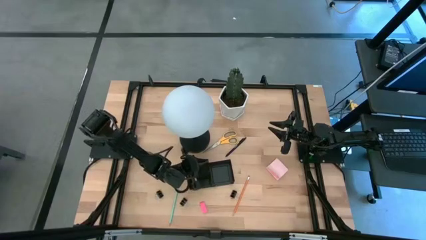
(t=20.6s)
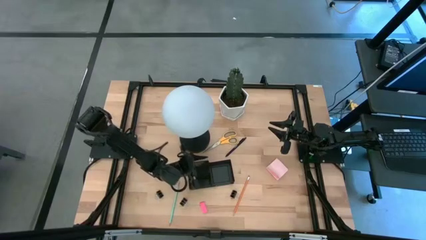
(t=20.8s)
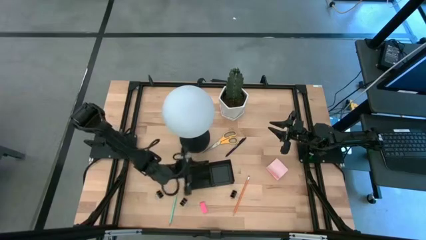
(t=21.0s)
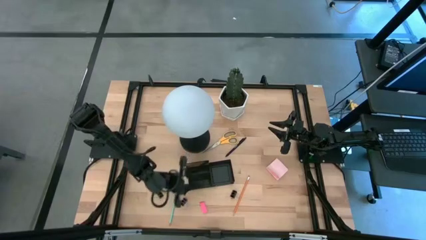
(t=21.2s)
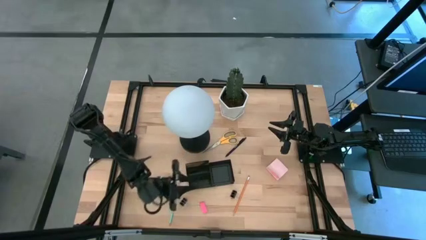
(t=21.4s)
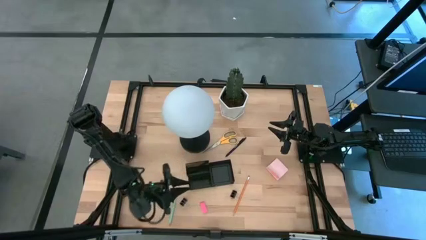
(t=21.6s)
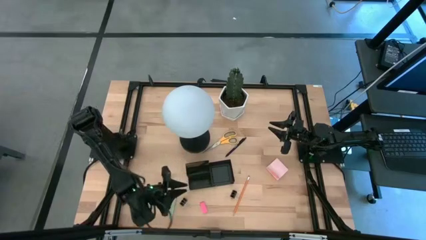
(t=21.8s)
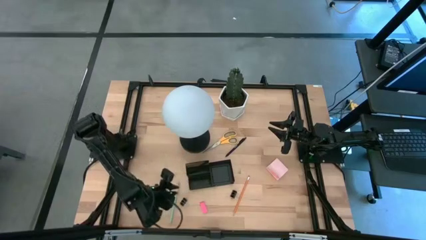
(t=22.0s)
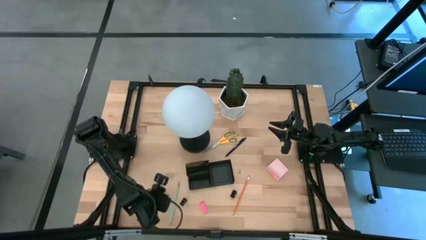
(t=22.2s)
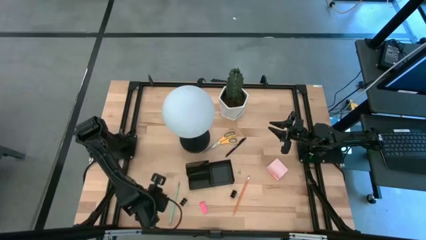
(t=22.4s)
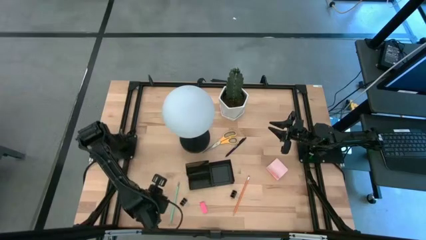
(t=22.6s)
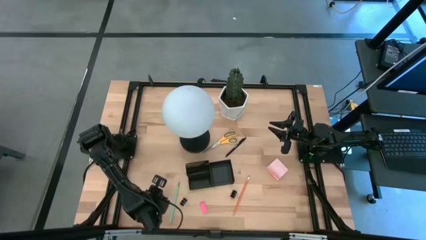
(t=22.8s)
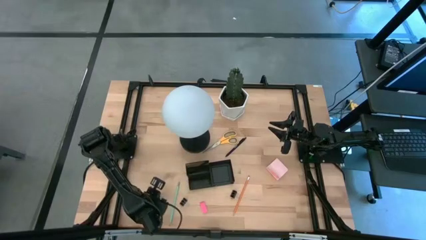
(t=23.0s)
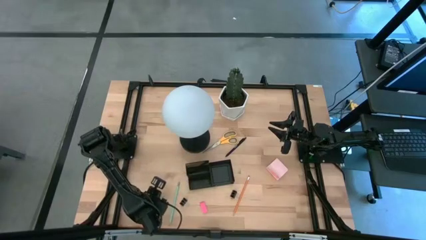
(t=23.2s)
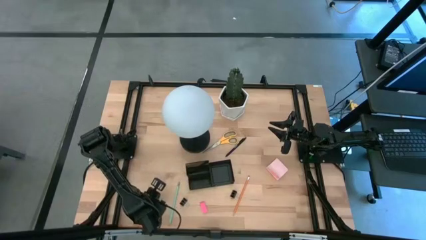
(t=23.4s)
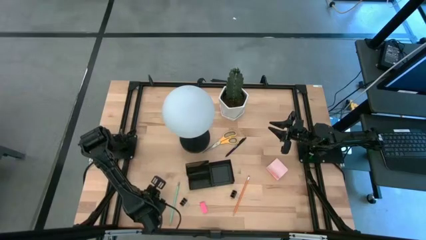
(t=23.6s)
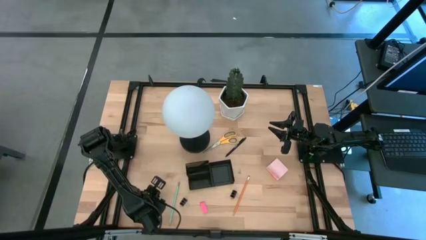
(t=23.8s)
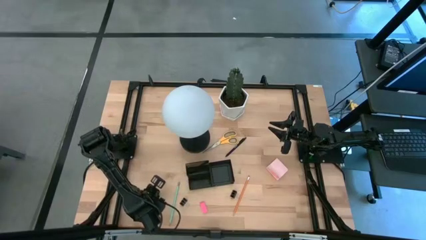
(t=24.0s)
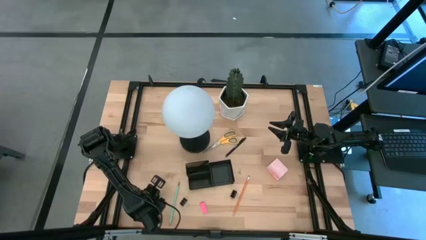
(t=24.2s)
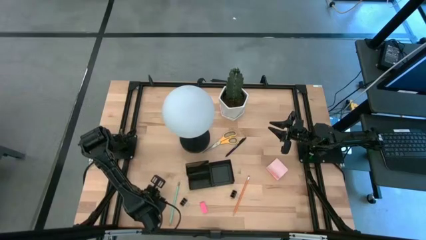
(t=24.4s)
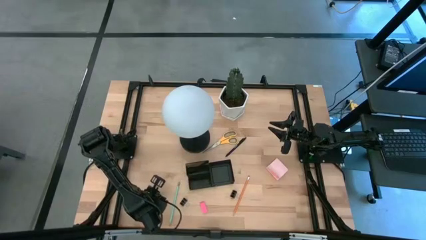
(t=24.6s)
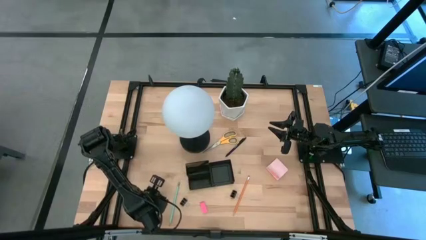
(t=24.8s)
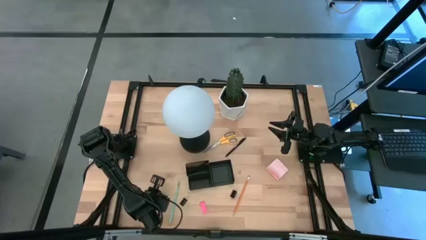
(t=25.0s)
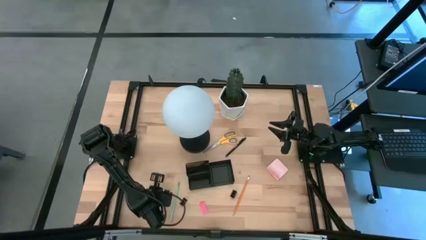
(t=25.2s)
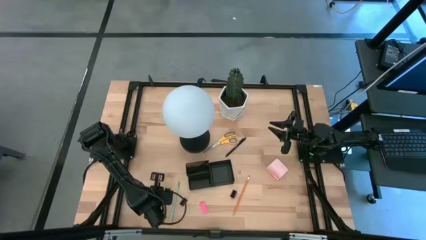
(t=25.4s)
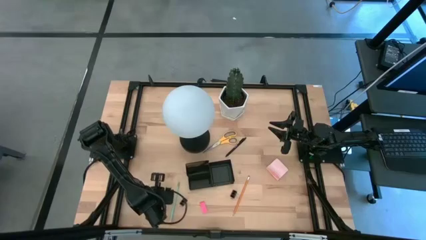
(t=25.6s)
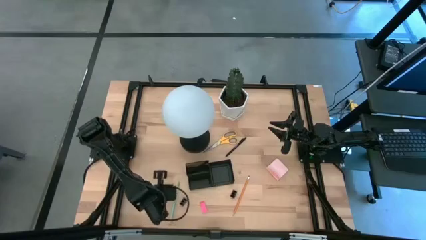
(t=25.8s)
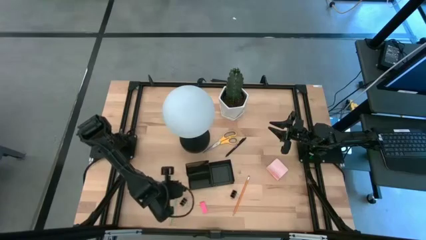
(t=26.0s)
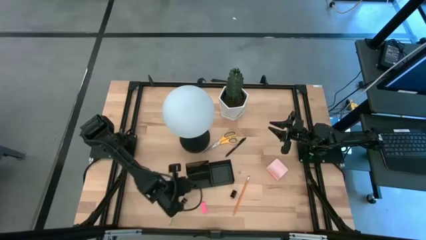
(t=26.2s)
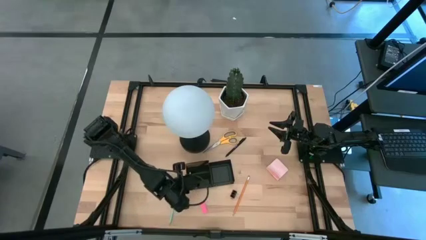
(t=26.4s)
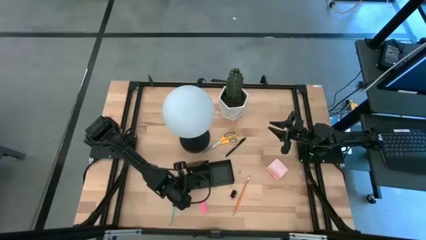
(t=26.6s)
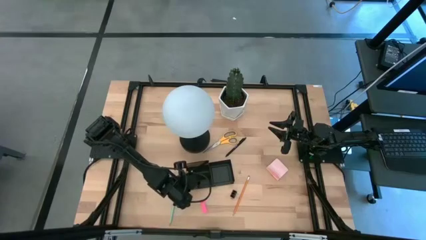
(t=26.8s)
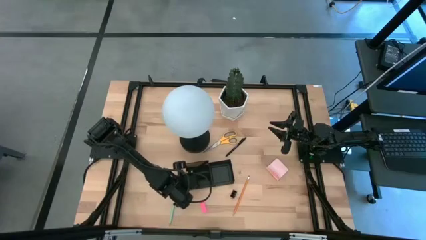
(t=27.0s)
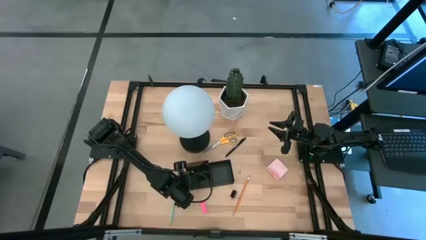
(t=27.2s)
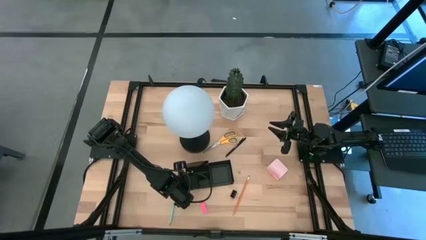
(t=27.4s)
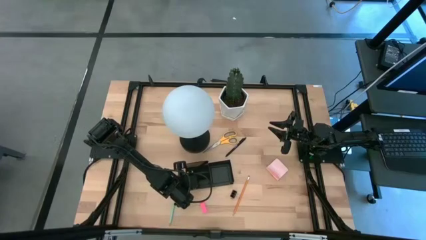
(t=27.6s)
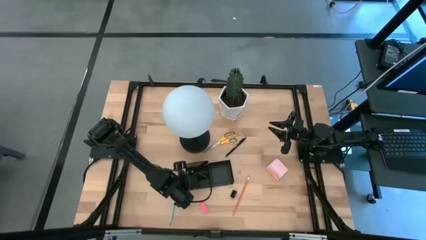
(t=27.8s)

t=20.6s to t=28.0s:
Task: Pick and place office supplies into organizer
Put the bottom left black binder clip into the desk organizer
